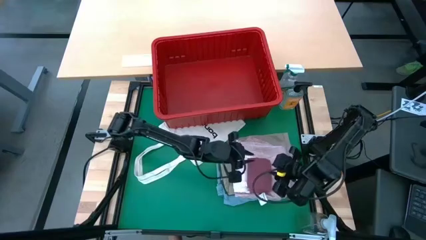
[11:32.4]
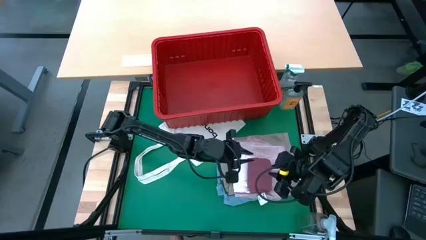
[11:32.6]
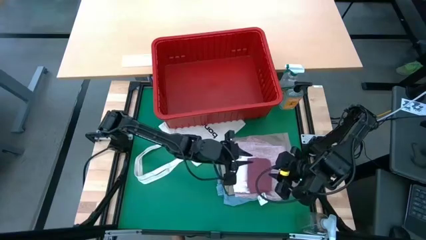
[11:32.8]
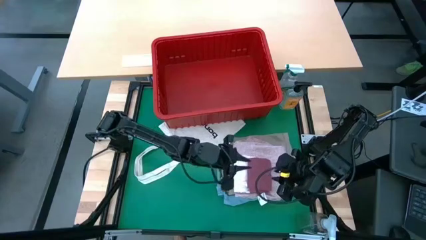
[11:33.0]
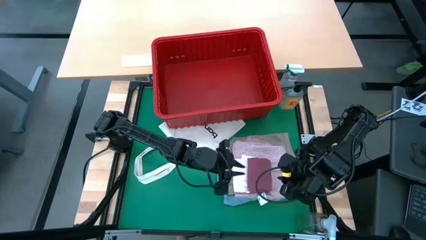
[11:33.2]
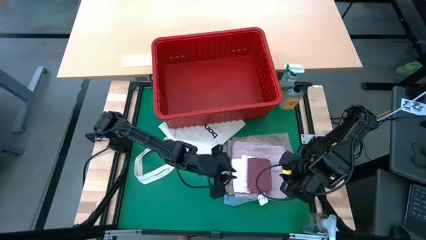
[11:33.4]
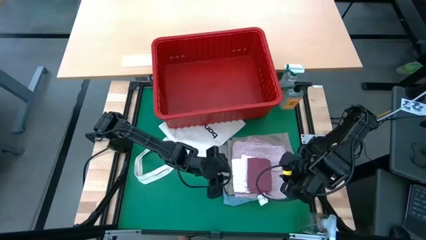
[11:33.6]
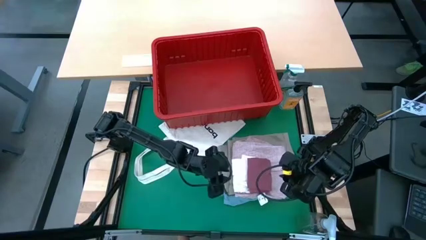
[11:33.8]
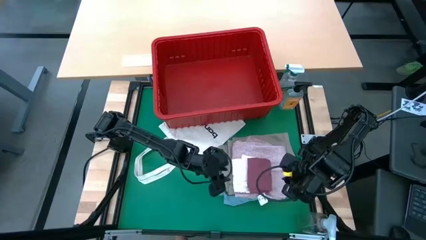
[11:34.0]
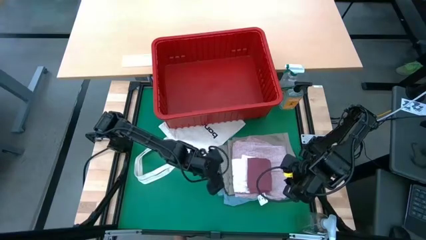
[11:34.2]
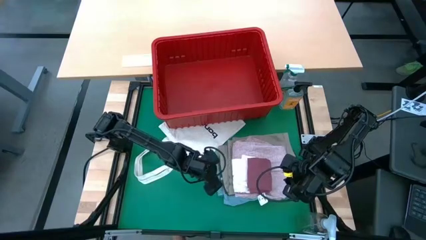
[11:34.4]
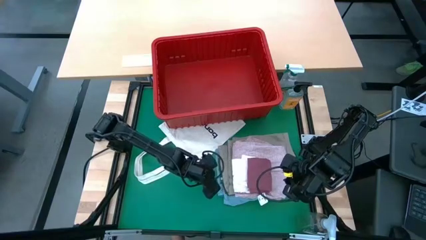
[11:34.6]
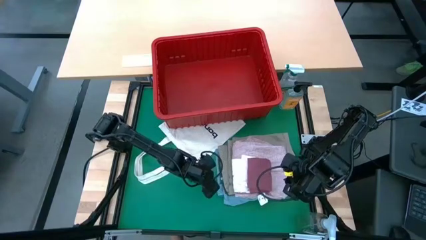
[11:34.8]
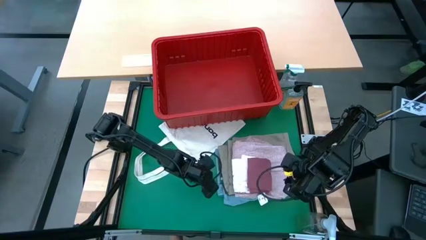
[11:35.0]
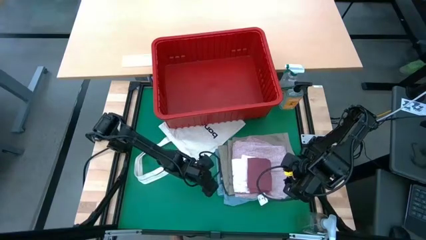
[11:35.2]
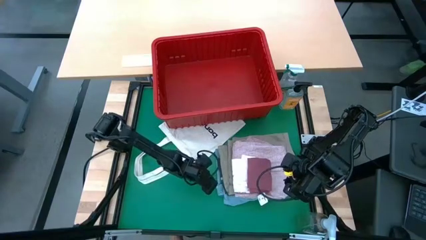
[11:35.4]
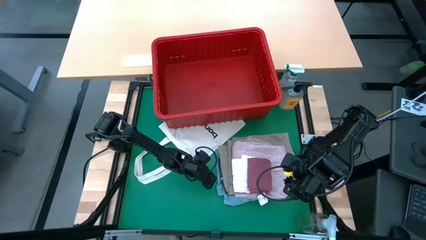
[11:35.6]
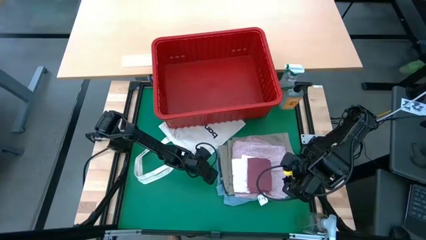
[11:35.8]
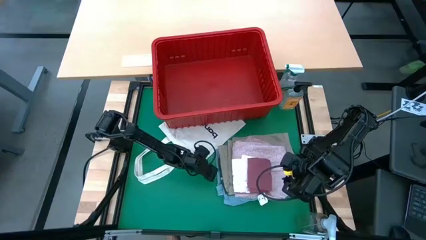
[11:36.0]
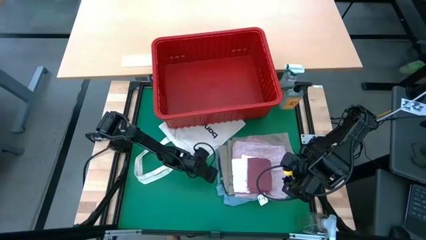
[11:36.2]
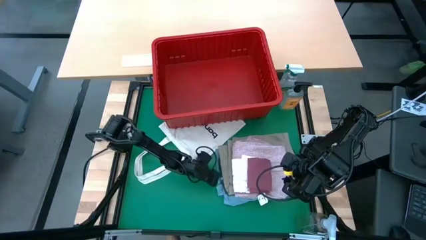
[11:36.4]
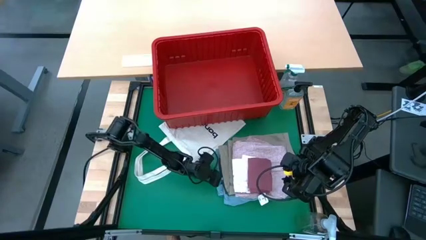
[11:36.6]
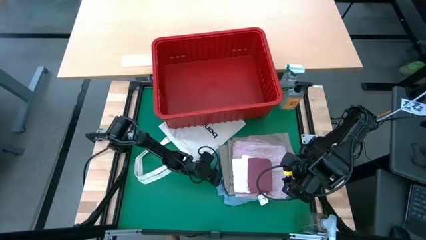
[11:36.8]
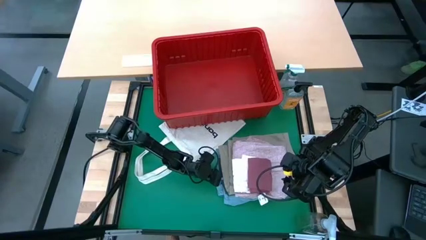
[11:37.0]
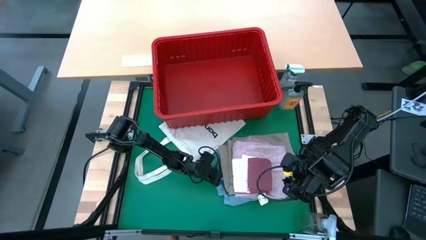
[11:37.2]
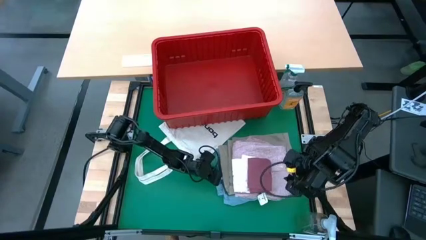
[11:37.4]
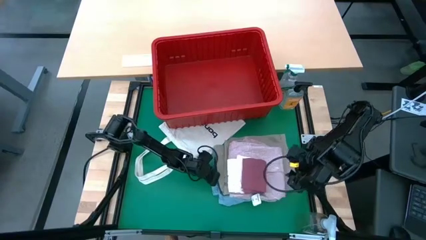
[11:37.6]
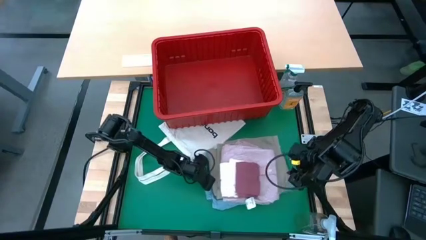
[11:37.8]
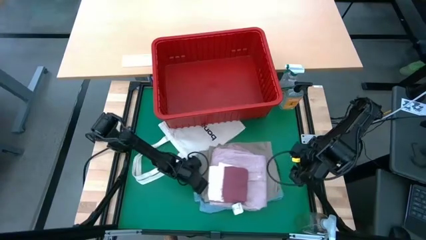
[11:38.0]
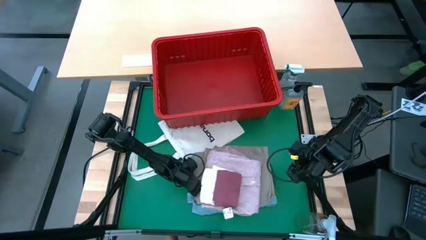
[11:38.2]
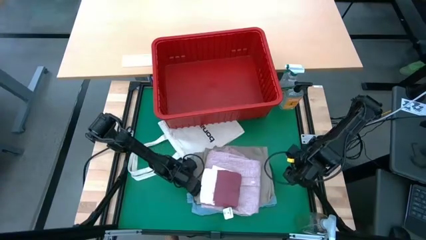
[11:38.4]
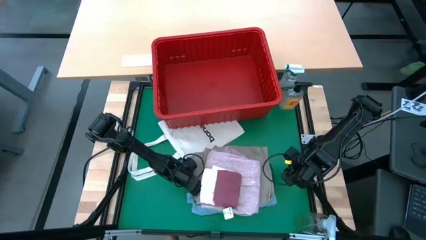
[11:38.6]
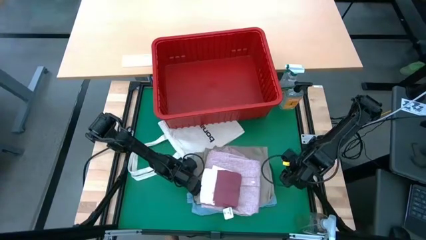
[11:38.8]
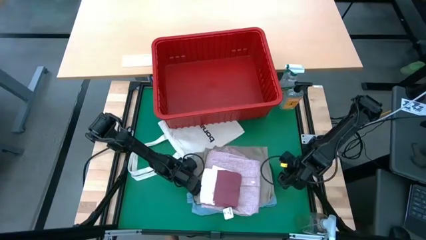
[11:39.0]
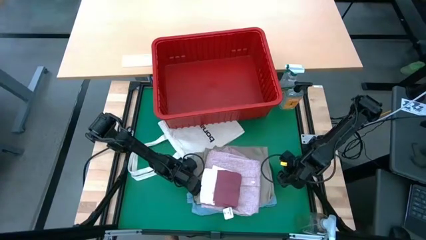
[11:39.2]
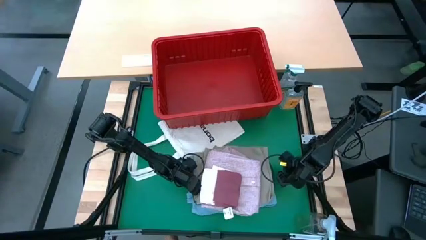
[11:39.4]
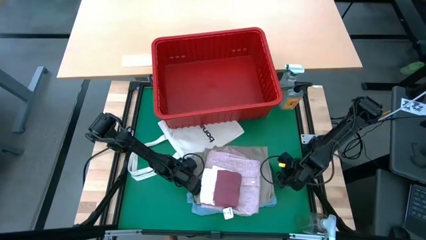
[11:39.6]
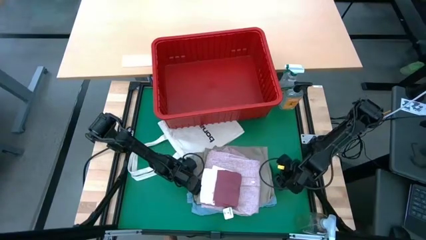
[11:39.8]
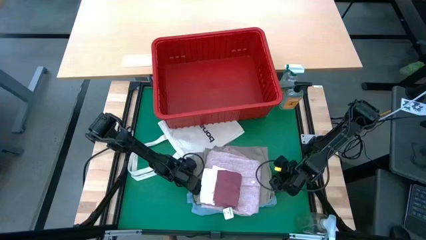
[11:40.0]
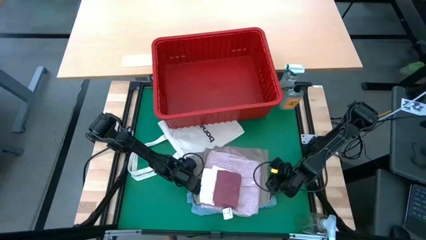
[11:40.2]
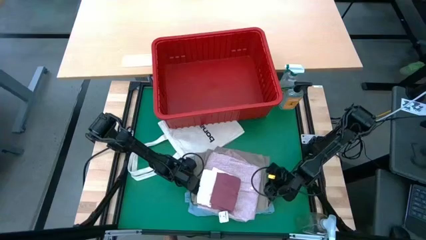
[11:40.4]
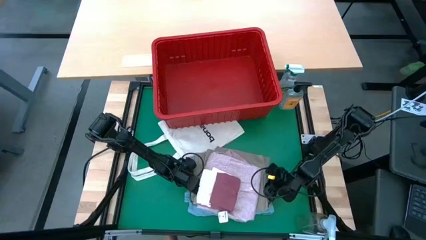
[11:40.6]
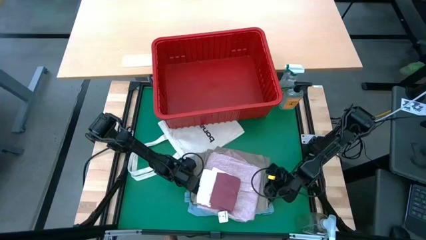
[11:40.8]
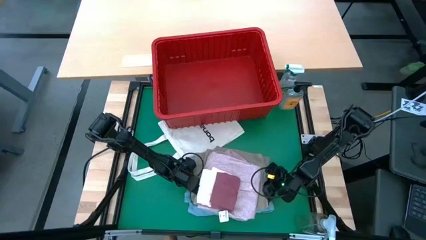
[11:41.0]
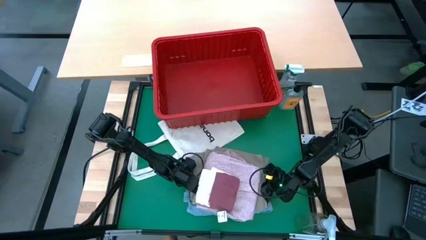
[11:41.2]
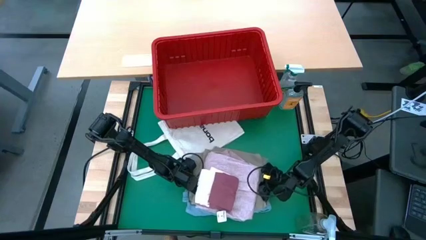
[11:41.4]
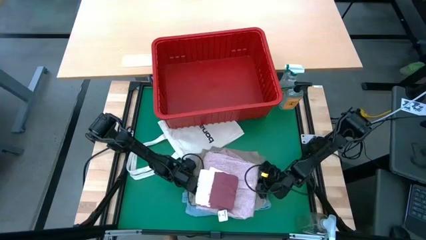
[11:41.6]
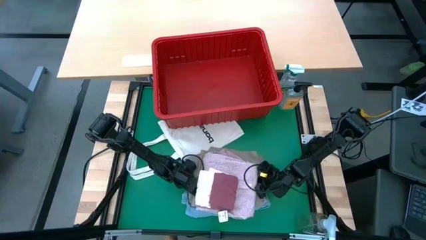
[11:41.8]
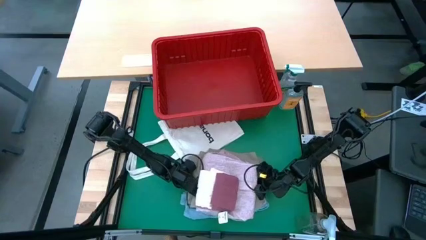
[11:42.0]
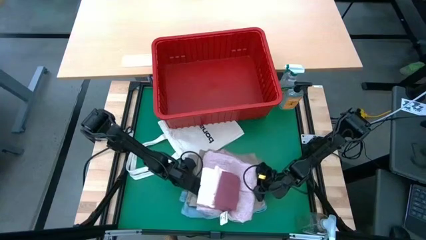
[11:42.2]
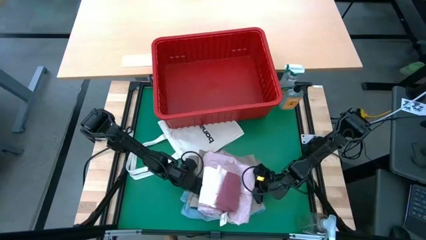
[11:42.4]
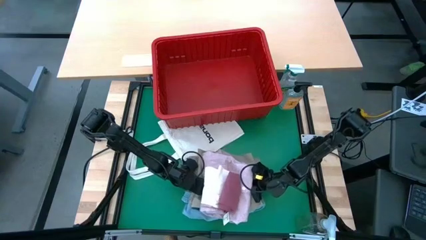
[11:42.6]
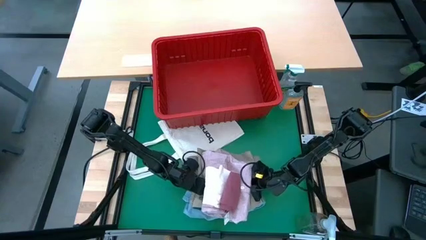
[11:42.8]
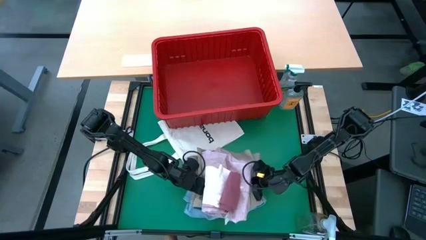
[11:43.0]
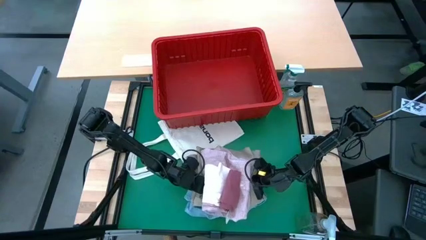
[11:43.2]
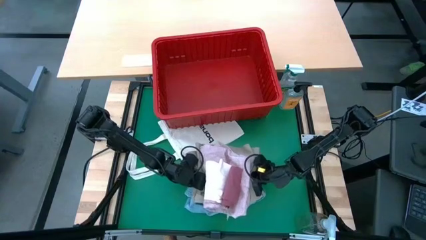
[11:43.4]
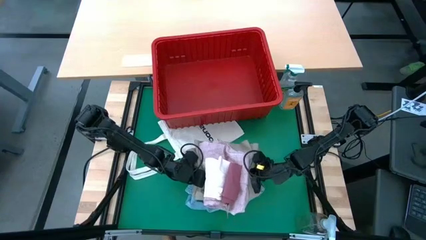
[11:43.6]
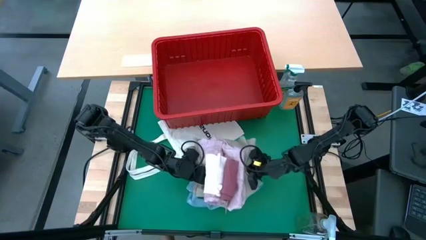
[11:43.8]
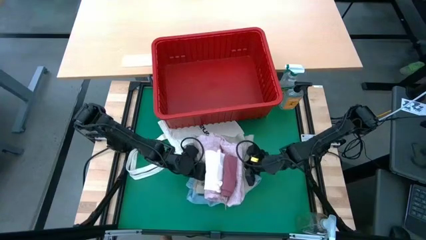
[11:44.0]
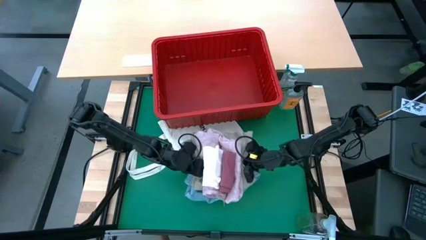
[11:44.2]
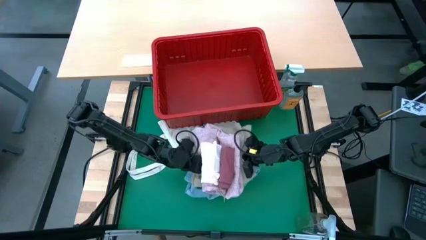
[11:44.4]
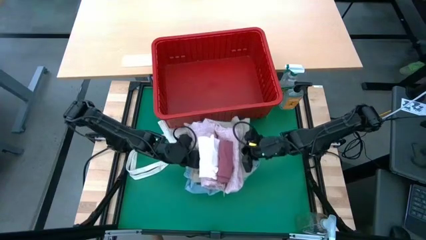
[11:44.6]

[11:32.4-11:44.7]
Task: Fold laundry
Put the stacked clothes into the red bin

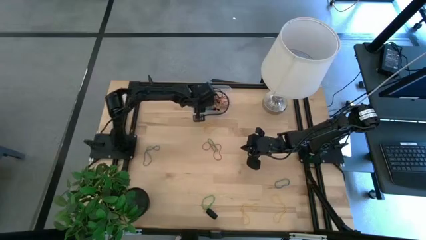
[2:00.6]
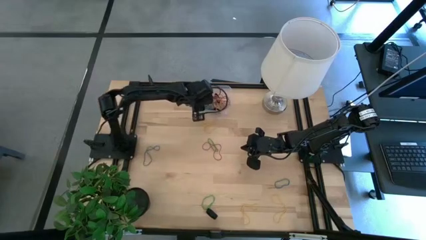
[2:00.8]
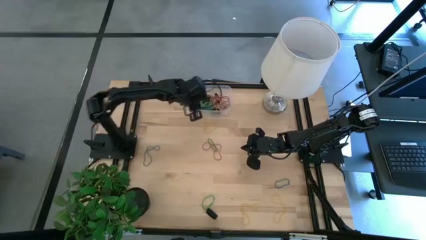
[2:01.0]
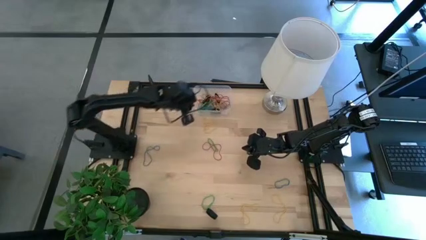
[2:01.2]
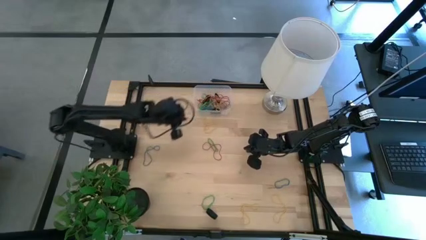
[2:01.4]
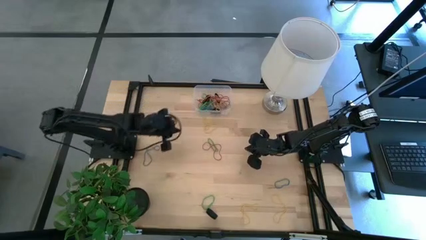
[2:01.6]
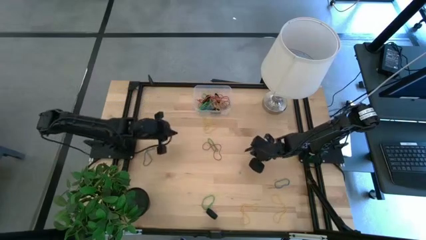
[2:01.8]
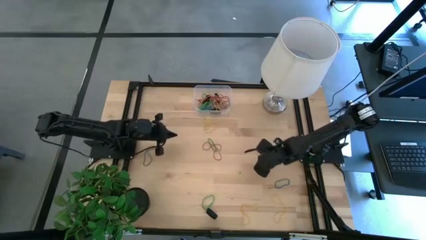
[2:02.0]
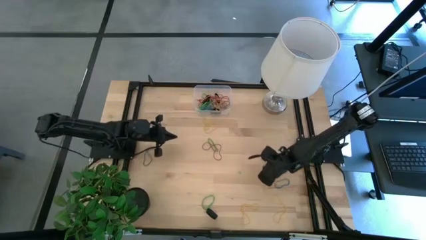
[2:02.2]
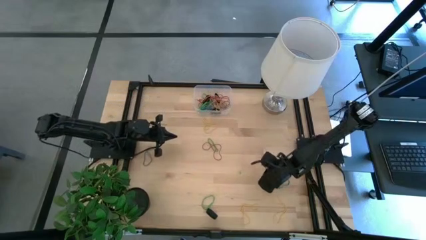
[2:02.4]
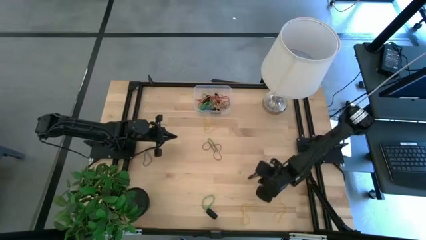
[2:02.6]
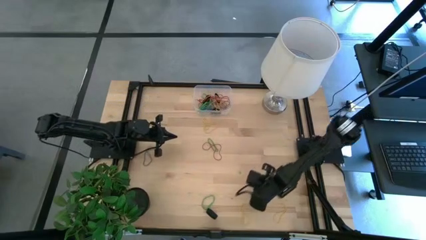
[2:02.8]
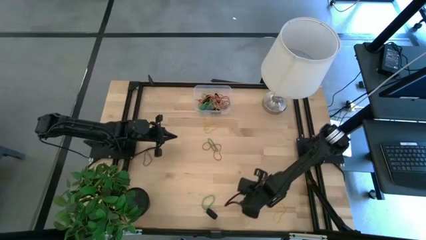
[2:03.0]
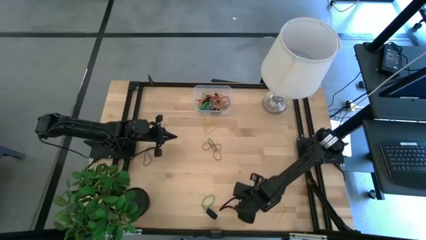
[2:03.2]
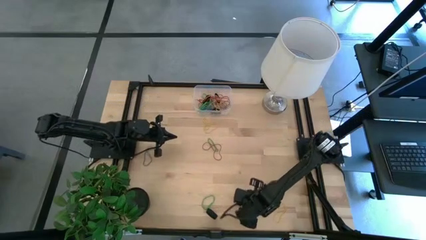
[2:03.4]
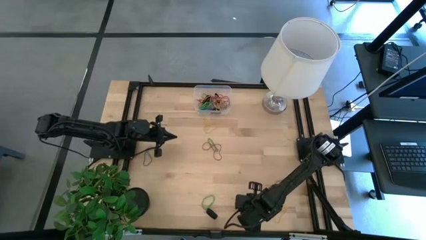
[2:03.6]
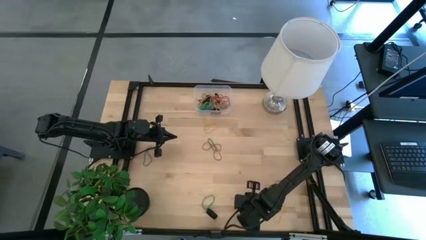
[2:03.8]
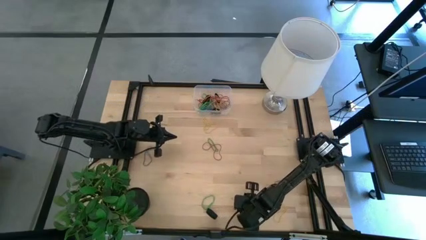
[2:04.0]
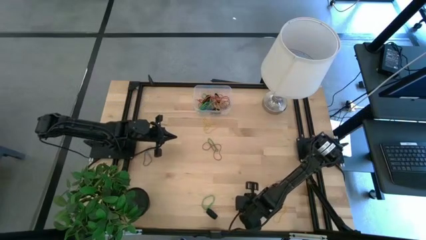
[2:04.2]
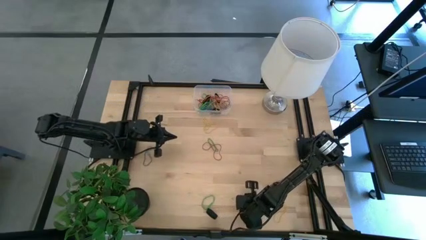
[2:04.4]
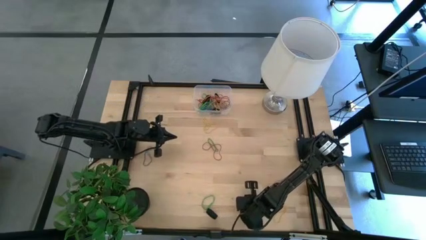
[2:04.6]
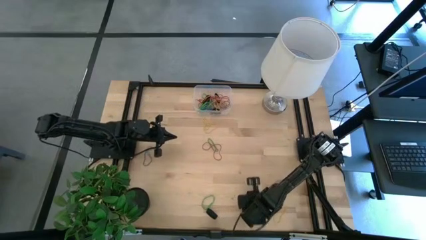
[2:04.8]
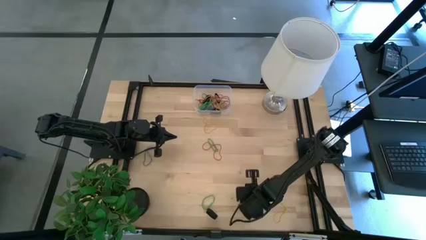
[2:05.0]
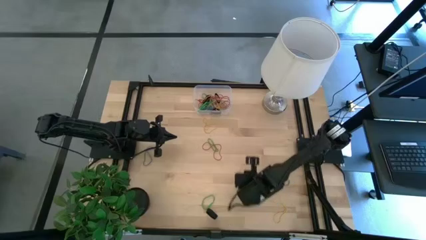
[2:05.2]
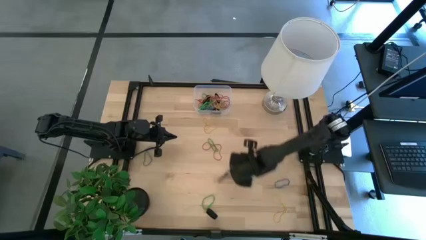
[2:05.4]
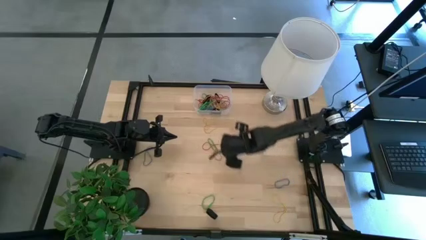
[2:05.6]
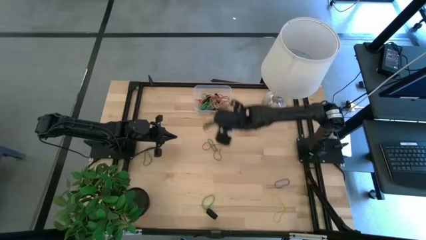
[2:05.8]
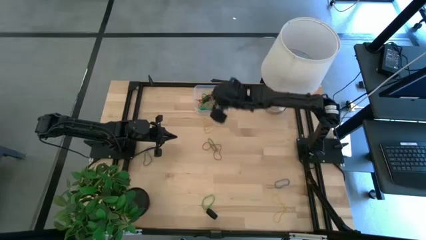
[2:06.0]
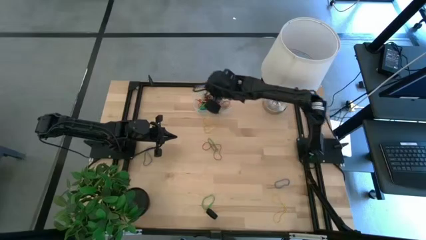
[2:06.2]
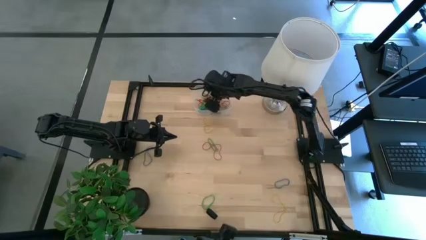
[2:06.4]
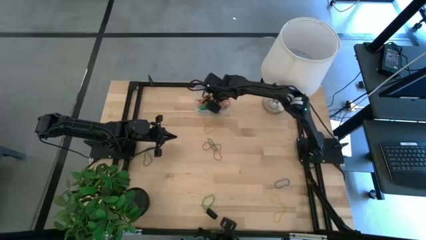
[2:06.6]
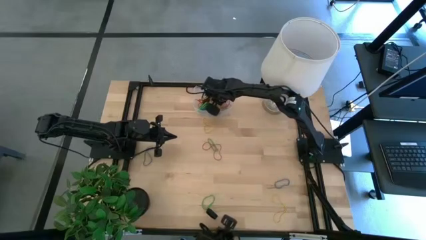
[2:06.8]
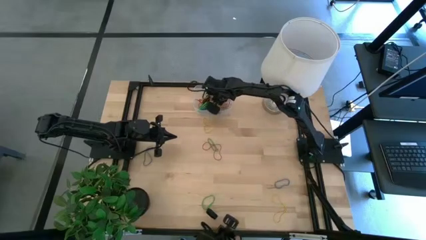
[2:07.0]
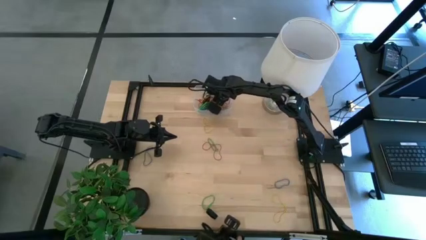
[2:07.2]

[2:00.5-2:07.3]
Task: Pick and place rubber bands into bin
Put the yellow rubber band into the transparent bin
